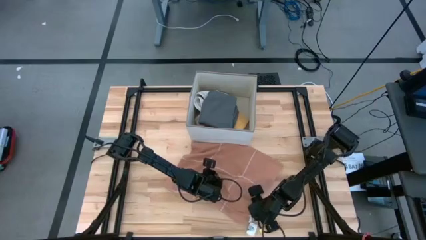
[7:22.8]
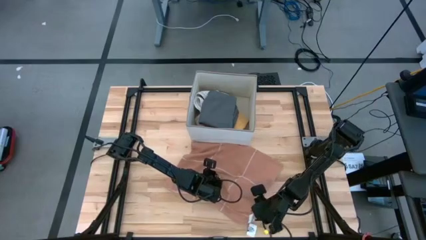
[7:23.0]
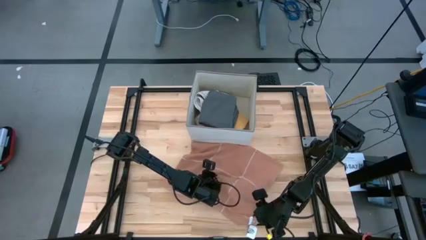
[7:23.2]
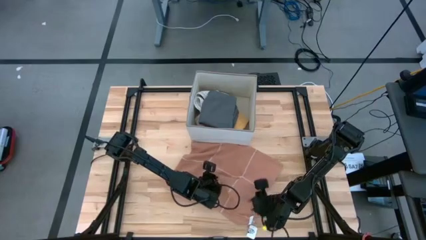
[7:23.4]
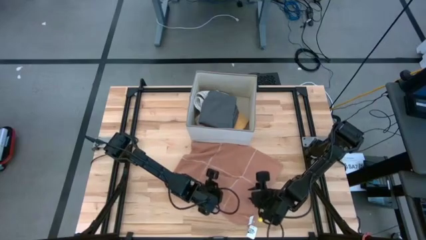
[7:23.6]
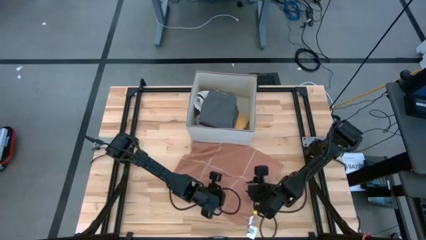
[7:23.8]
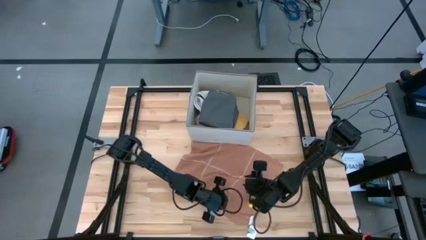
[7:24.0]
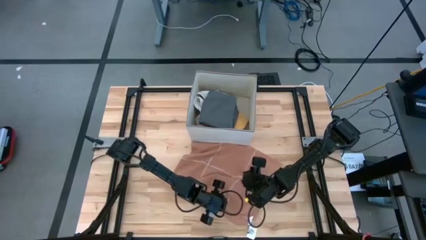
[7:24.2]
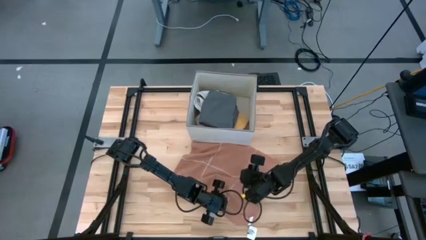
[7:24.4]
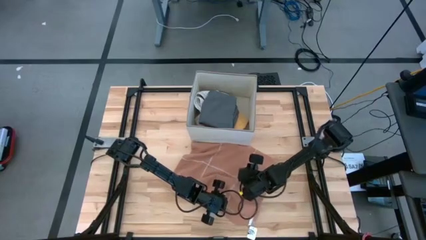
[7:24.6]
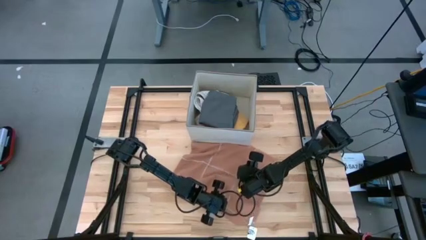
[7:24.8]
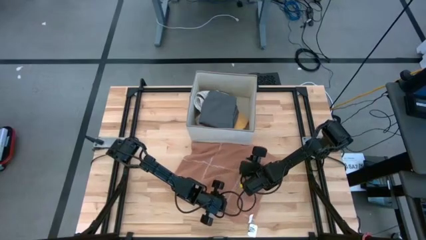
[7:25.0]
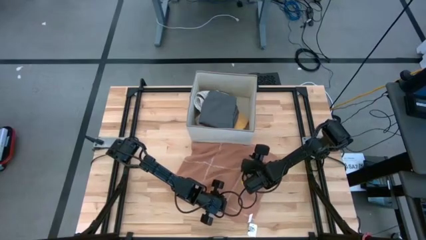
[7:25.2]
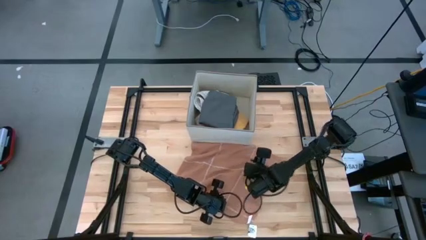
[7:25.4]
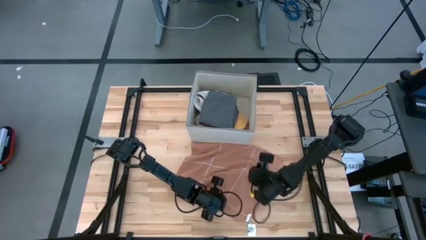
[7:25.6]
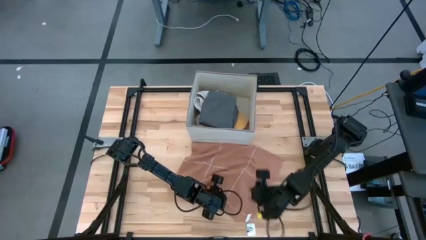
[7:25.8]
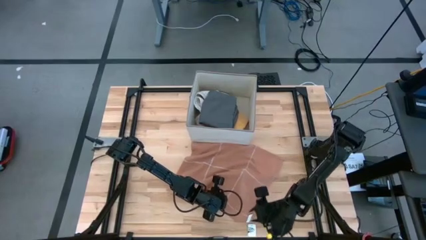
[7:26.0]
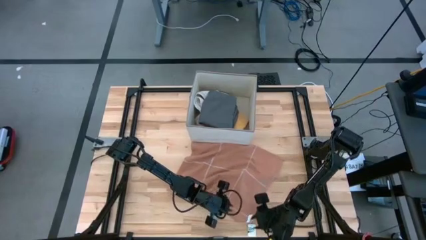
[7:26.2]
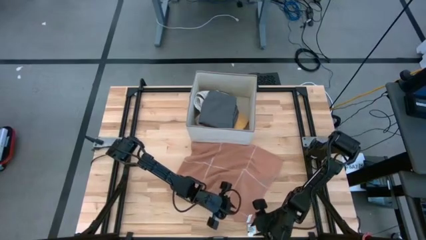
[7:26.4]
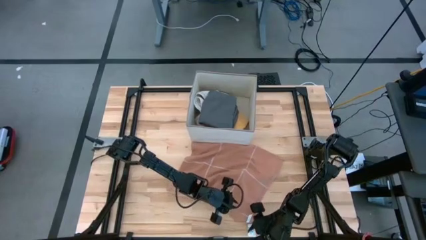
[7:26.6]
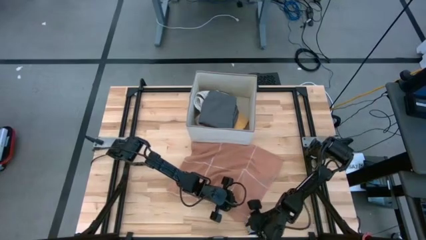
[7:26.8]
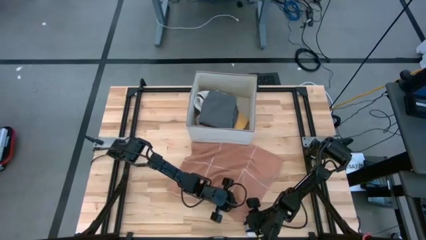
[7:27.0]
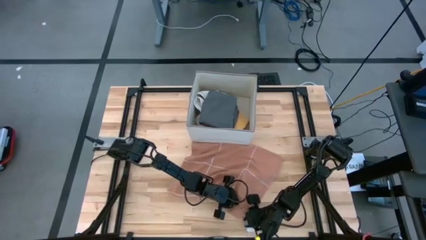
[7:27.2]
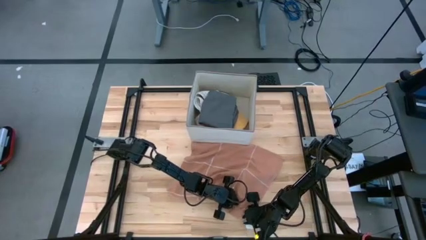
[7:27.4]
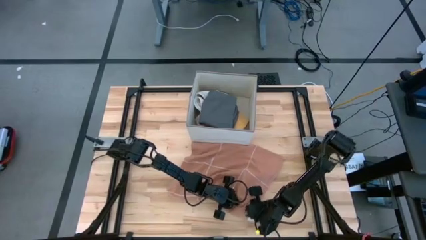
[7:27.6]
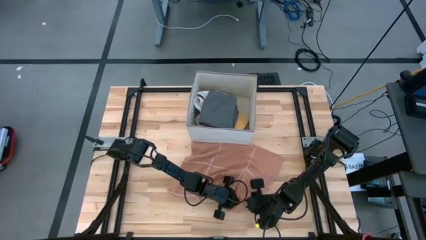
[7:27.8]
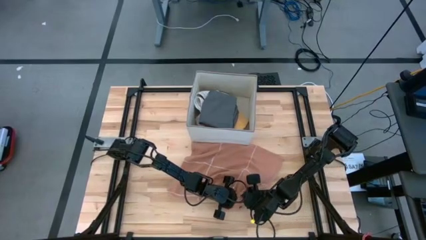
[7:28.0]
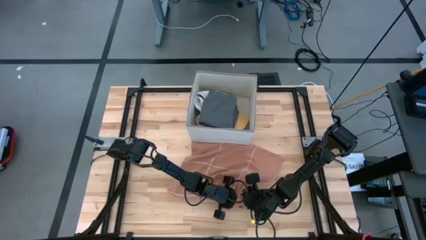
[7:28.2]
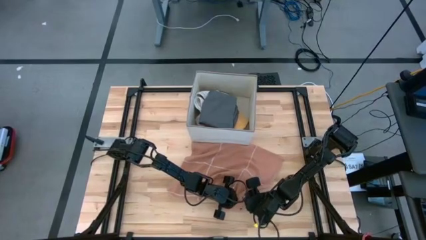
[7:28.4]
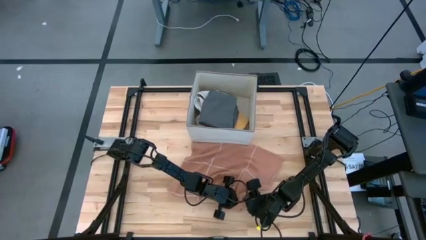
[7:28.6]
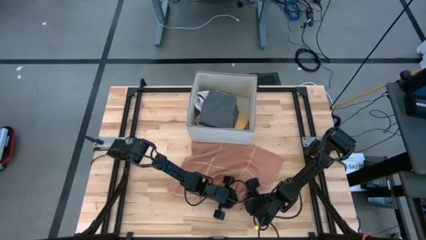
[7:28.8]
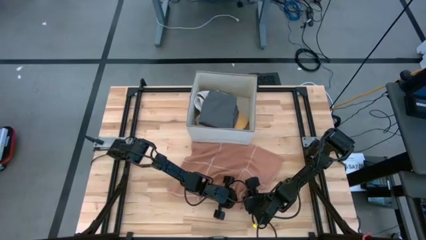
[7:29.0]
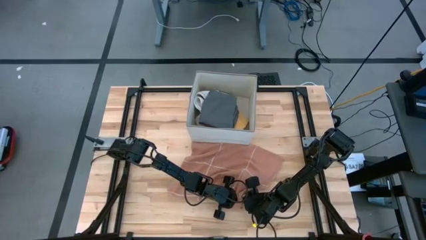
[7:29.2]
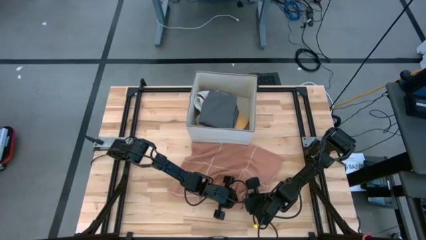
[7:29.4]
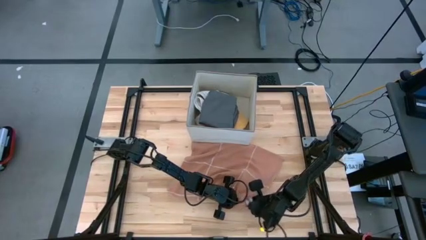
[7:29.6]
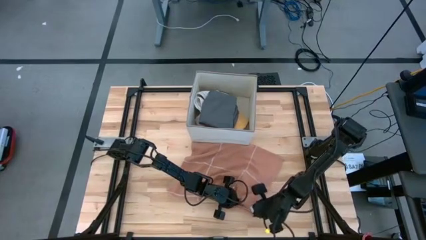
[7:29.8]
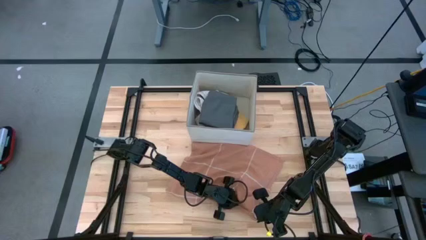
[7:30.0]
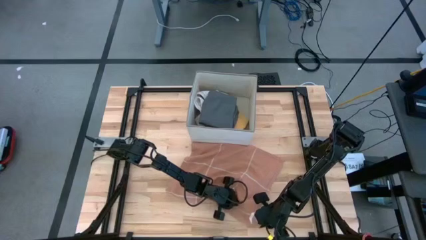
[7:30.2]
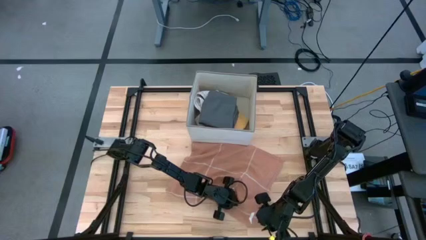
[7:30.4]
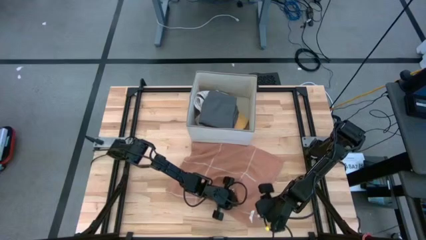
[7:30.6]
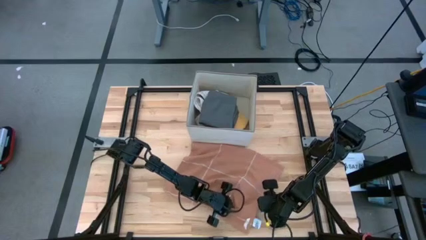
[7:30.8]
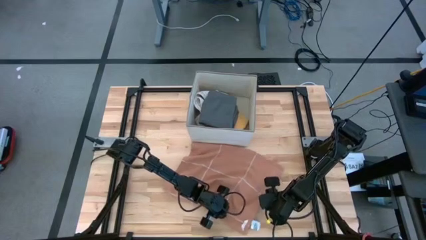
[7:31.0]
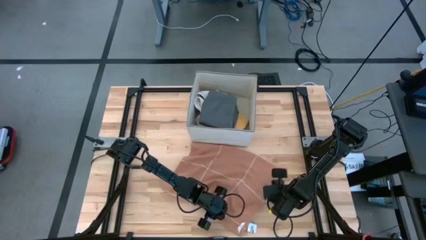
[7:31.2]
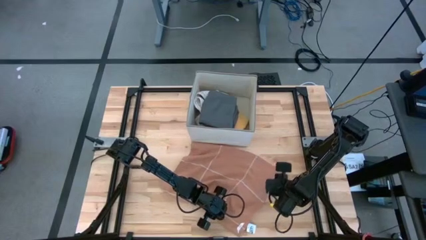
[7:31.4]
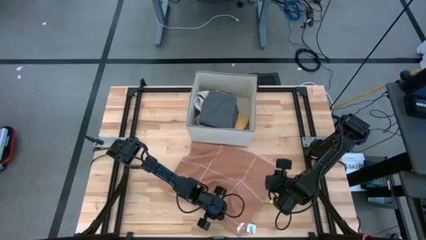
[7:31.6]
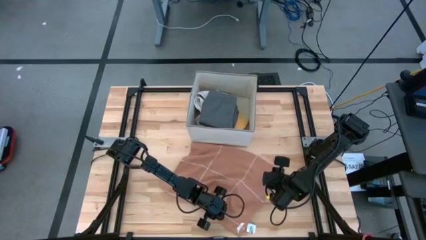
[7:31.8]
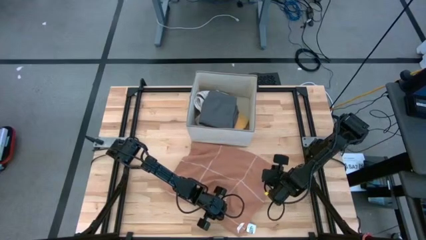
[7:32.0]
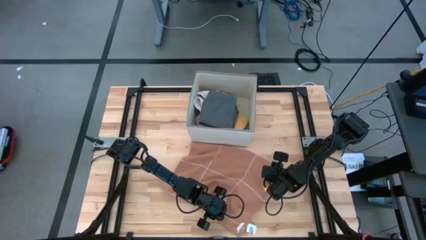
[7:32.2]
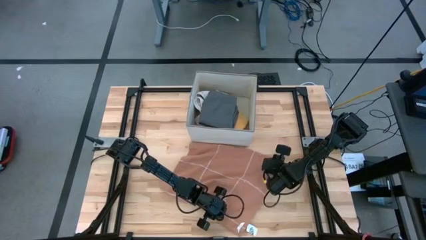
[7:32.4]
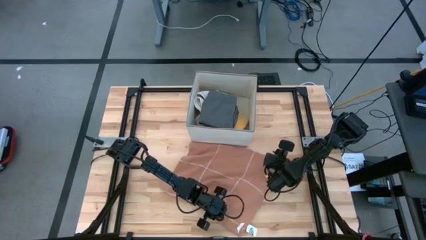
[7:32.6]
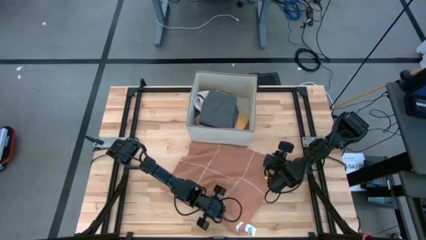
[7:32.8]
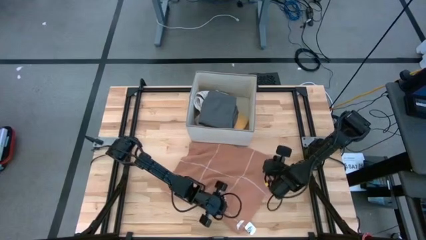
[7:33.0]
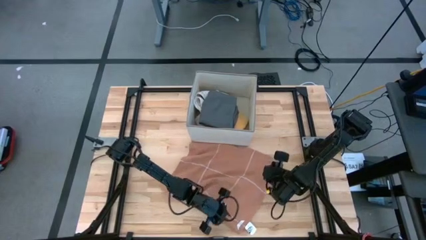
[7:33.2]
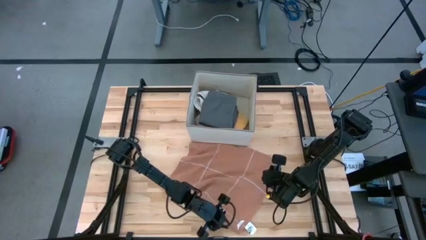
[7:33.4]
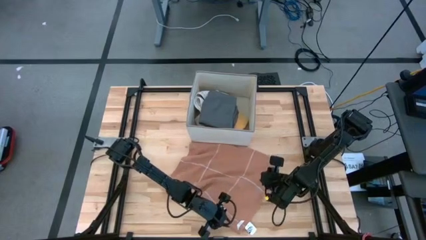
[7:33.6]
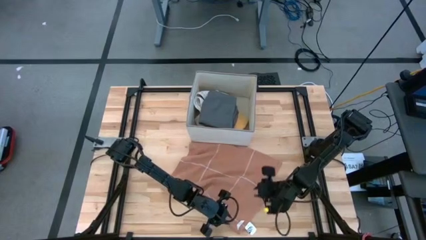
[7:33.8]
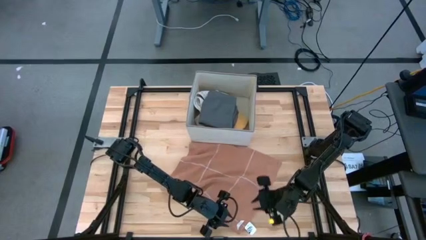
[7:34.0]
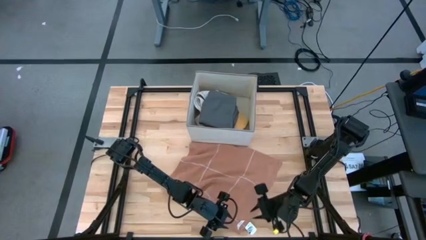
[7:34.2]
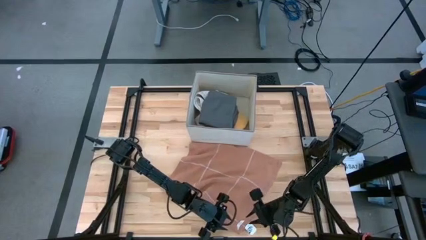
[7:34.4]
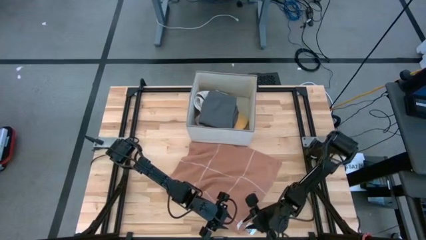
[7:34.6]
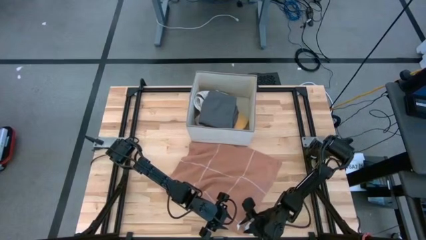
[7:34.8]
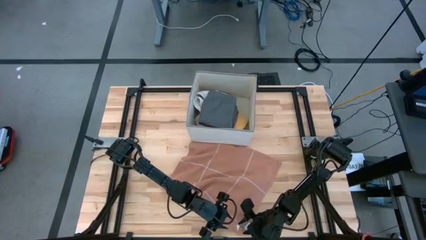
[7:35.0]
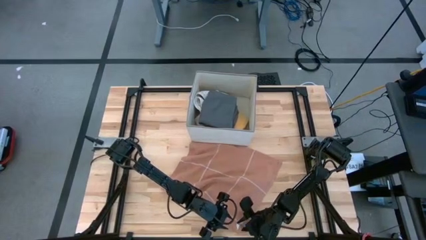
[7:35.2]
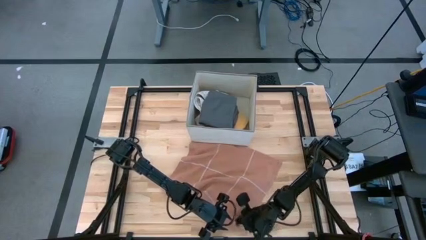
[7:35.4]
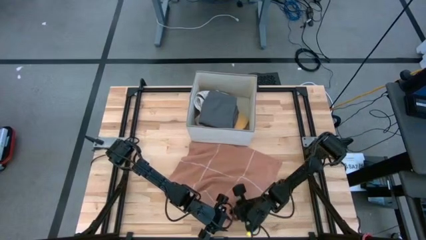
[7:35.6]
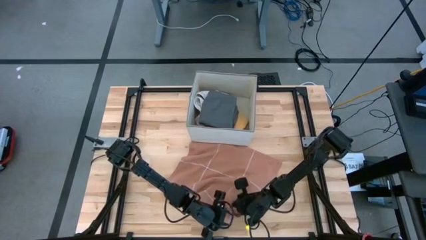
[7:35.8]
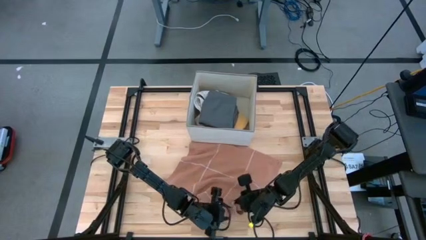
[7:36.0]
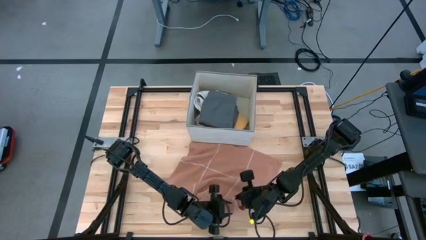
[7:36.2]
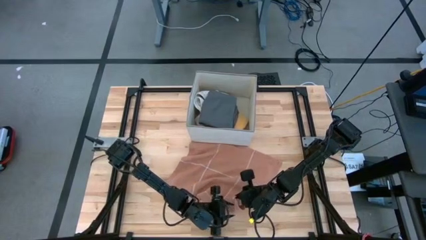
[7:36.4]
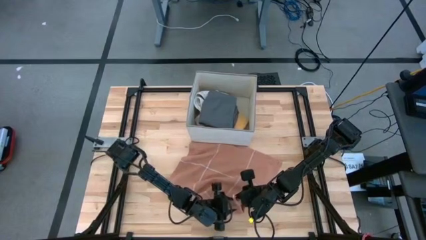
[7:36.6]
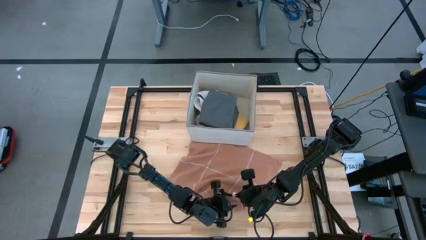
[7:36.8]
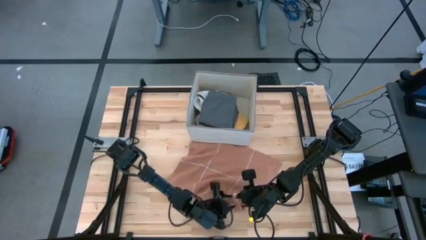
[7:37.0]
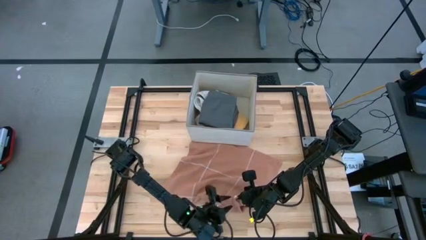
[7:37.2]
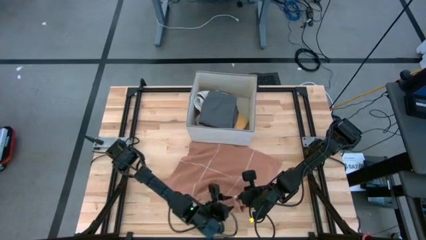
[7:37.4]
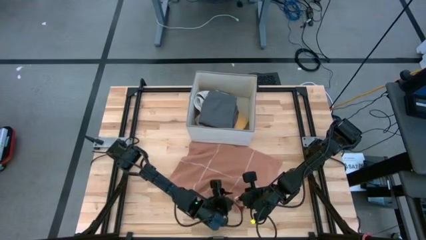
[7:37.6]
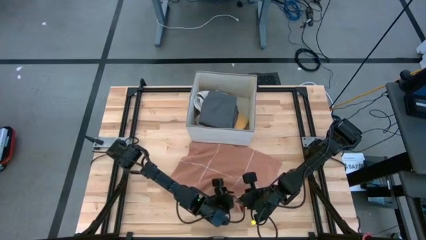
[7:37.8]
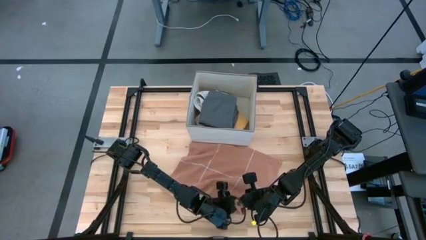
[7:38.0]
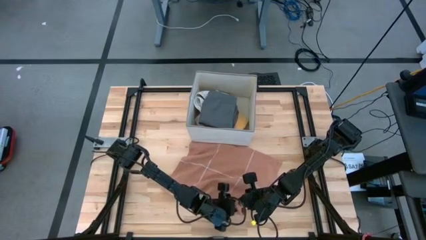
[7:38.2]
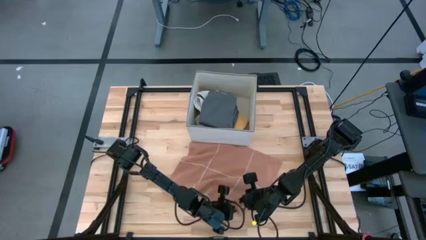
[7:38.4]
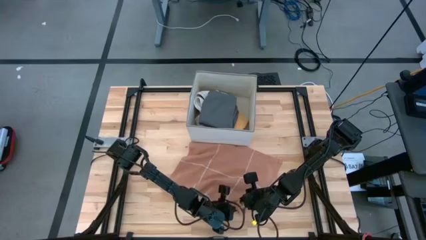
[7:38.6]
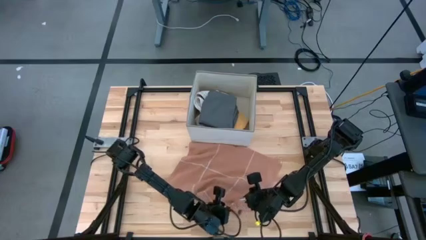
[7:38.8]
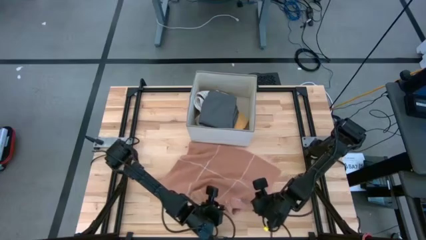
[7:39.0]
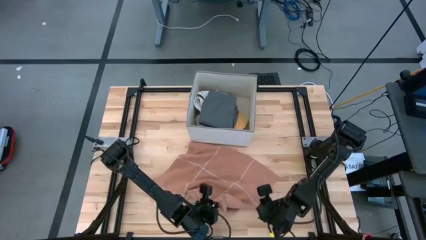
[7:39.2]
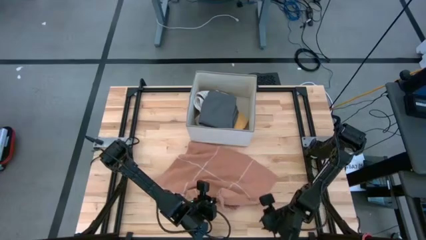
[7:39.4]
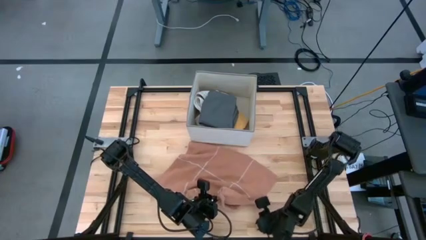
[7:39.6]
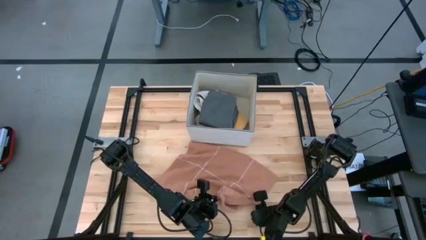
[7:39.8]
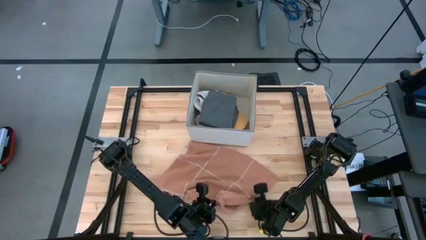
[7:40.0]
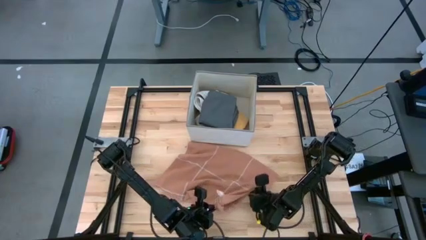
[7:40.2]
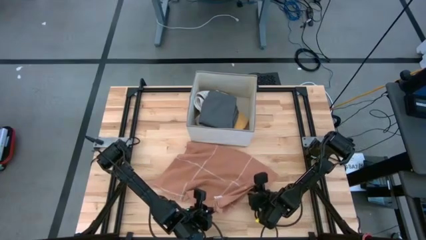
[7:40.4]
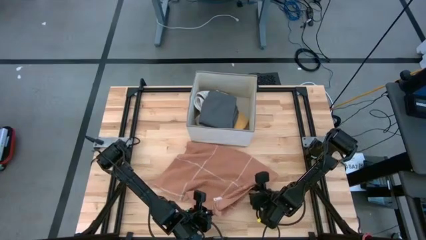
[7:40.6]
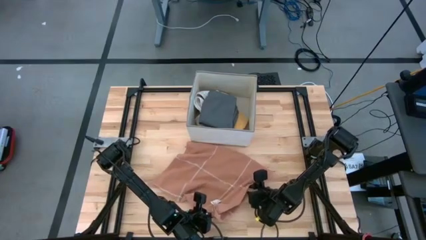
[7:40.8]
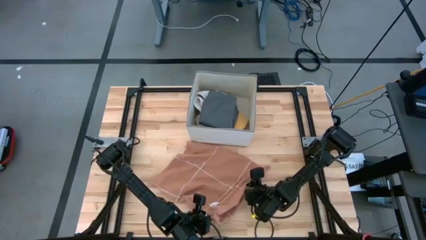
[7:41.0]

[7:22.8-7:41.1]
Task: Fold towel
Fold the brown towel with white checkered lines
